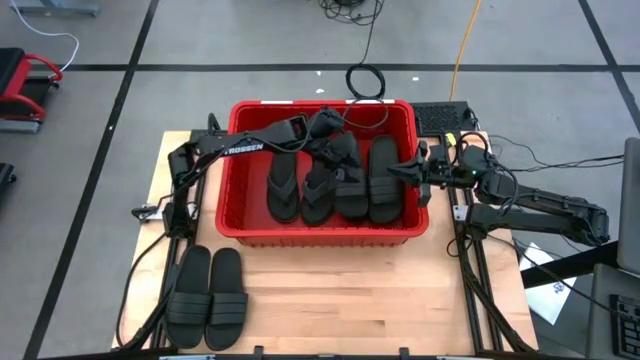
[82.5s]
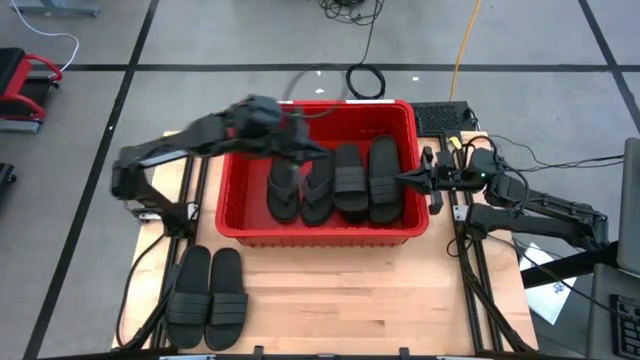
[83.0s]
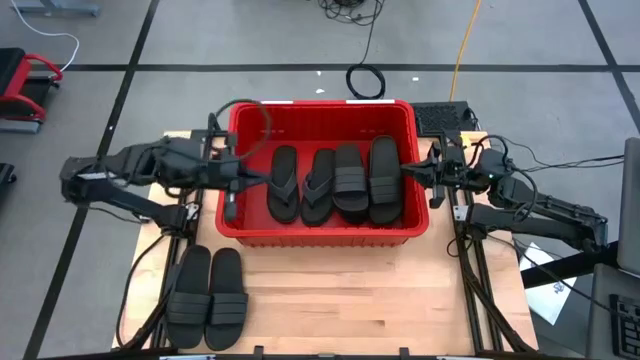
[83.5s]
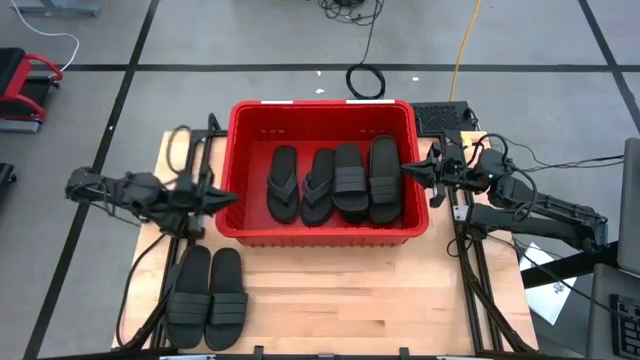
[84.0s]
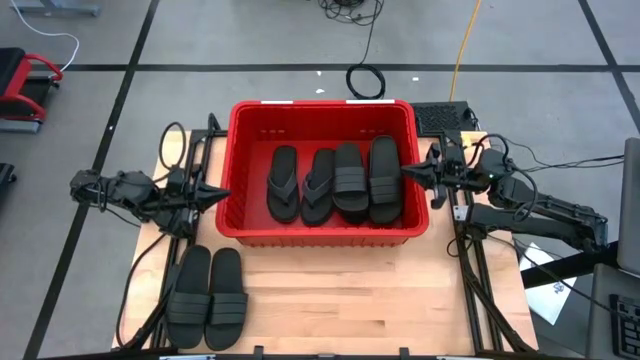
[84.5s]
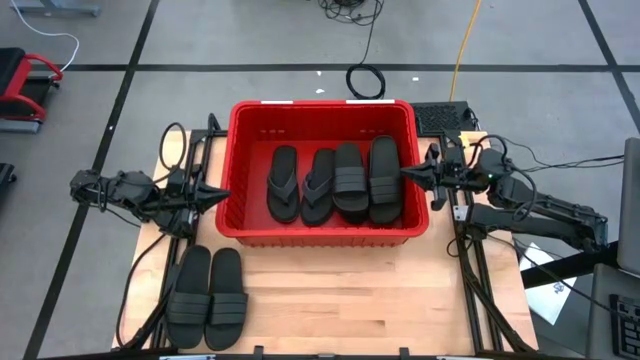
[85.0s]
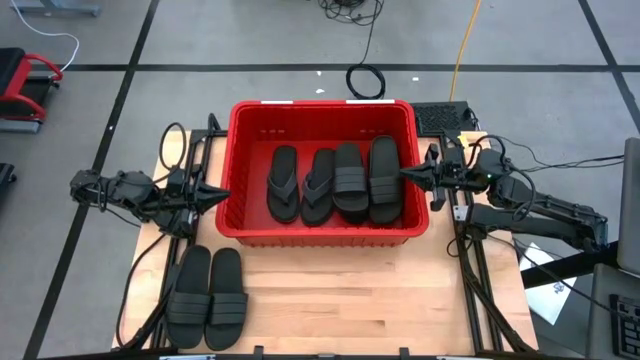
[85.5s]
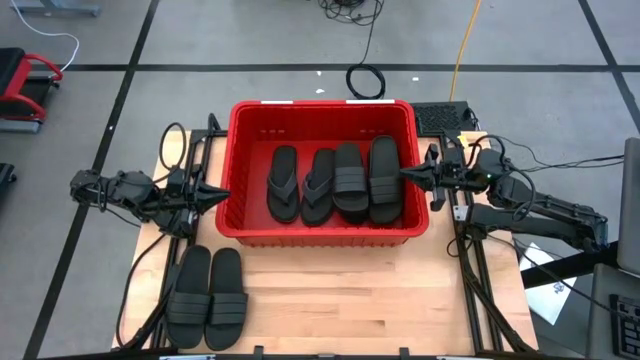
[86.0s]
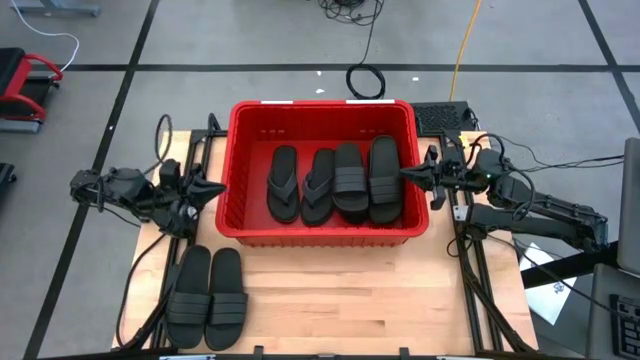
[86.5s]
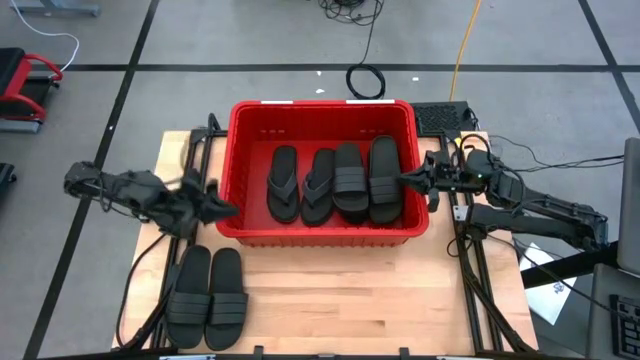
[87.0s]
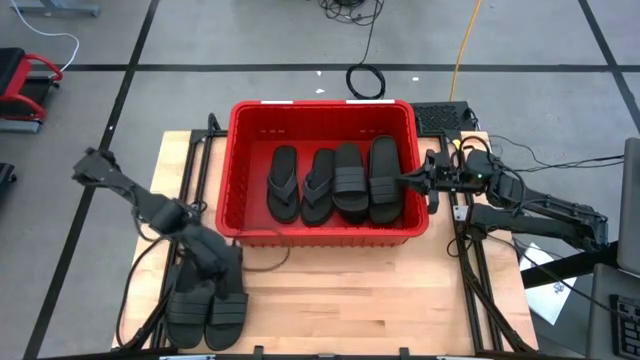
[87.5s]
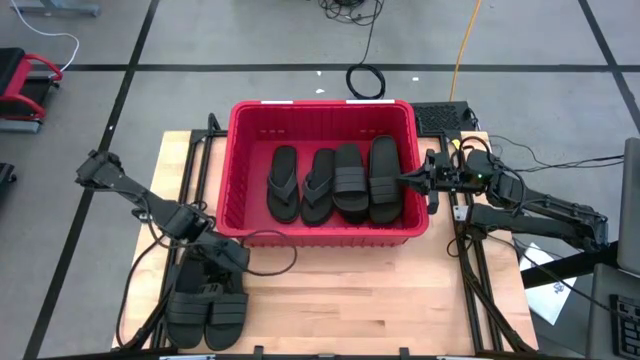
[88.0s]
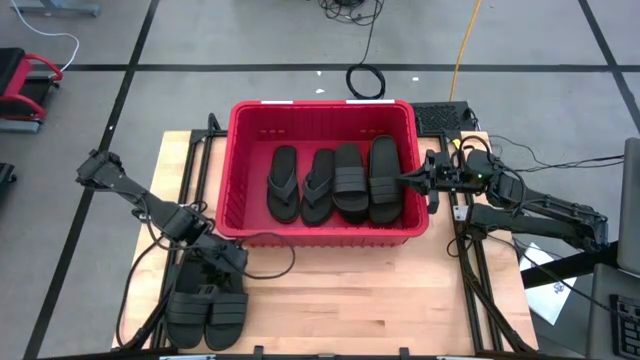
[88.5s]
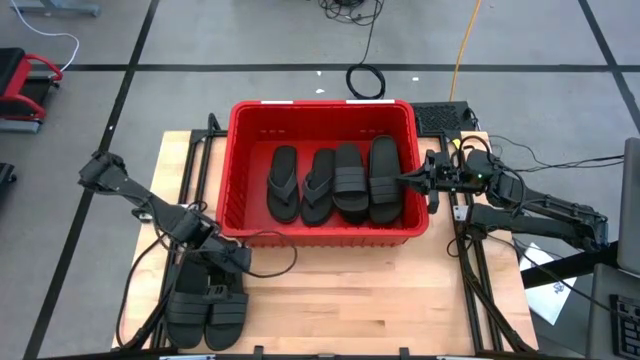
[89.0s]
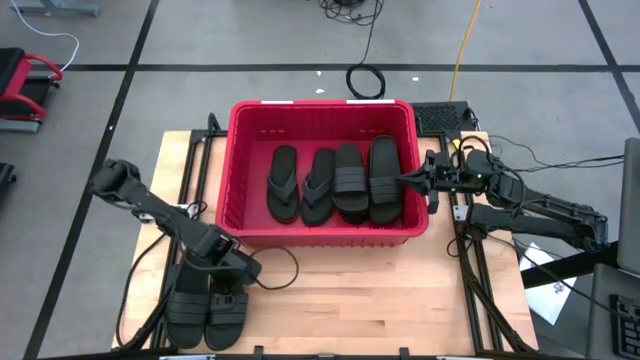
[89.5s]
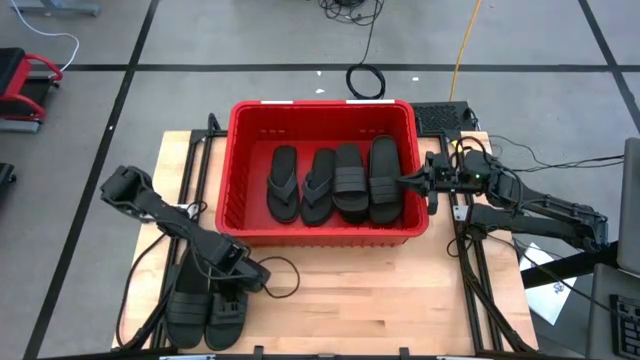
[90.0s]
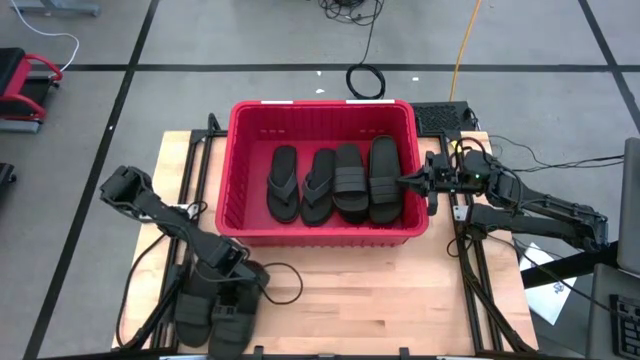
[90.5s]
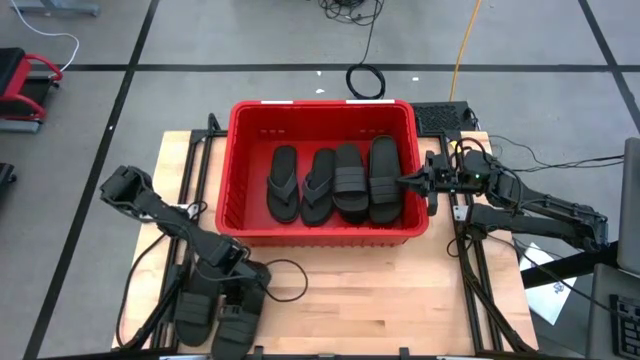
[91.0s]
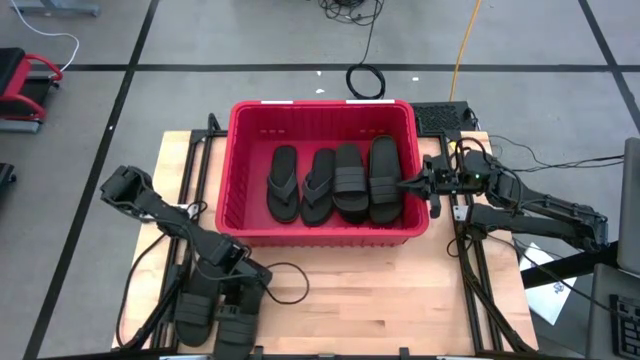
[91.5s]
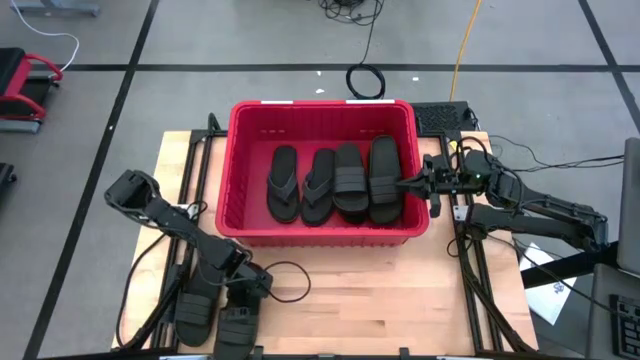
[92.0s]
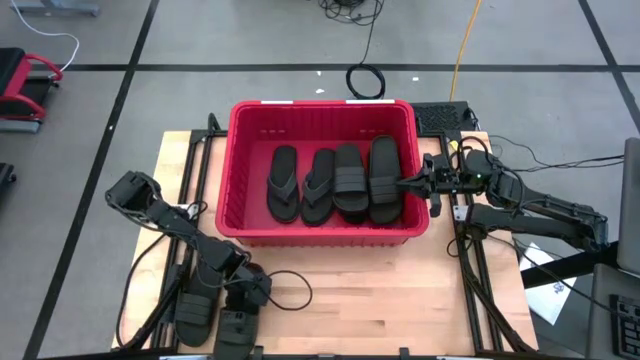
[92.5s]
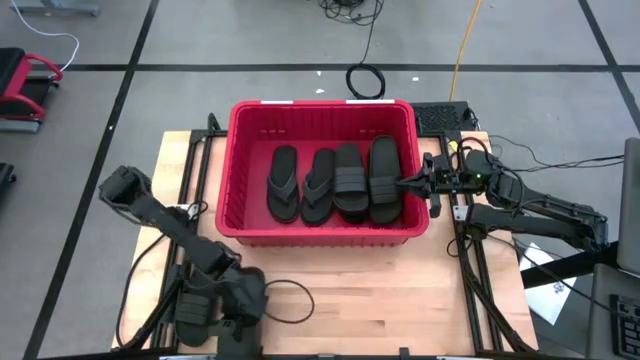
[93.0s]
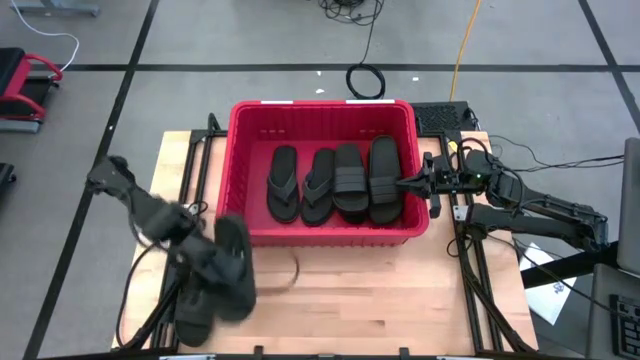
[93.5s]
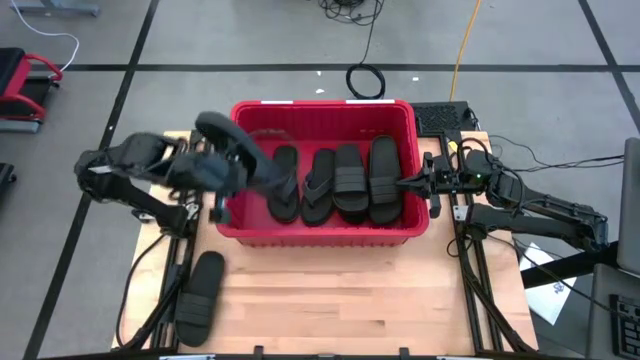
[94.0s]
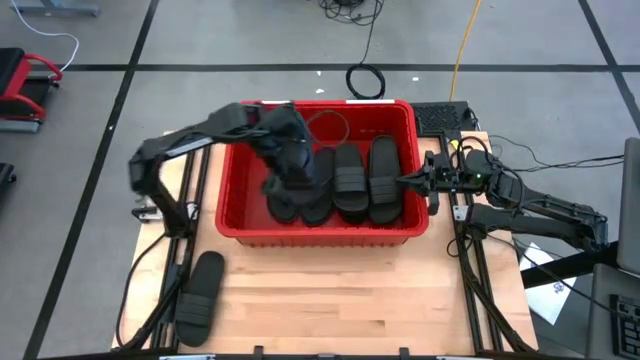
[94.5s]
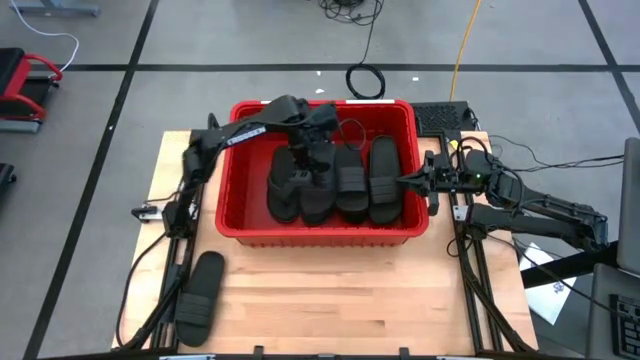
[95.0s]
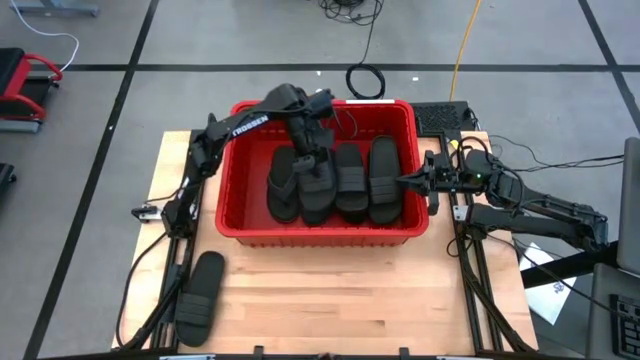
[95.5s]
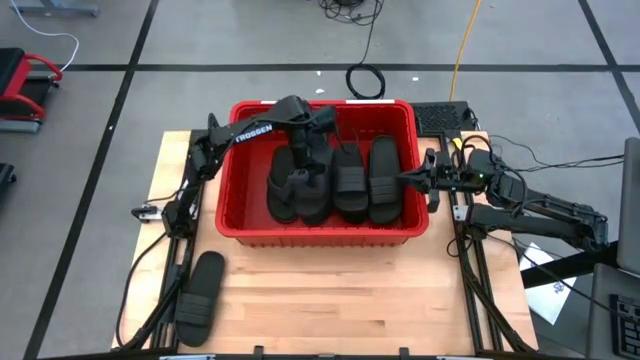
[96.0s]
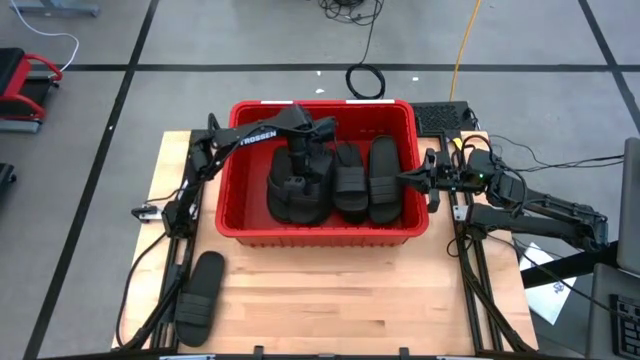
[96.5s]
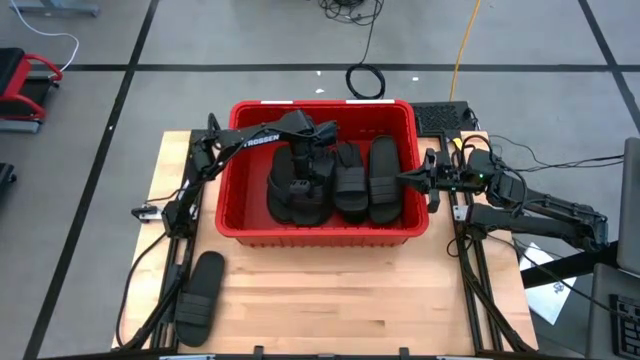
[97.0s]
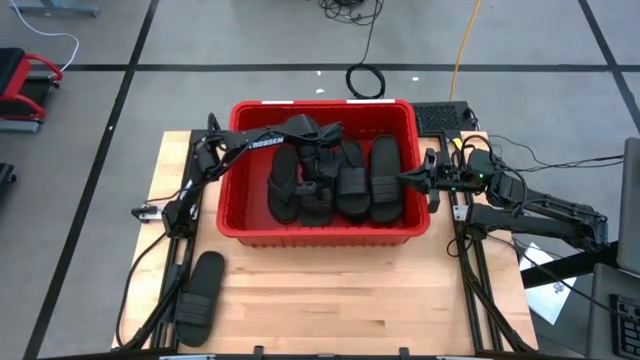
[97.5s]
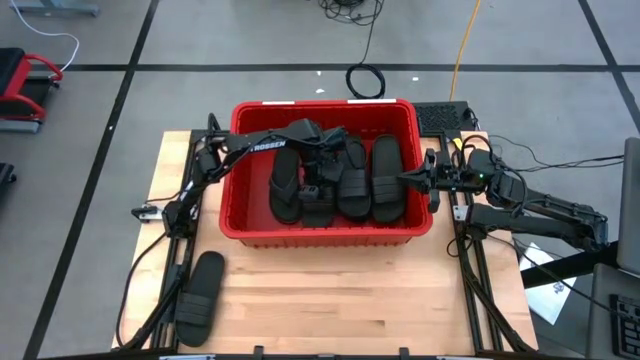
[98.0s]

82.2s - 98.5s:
Task: Pick and place slides into bin
Put the right slide into the bin

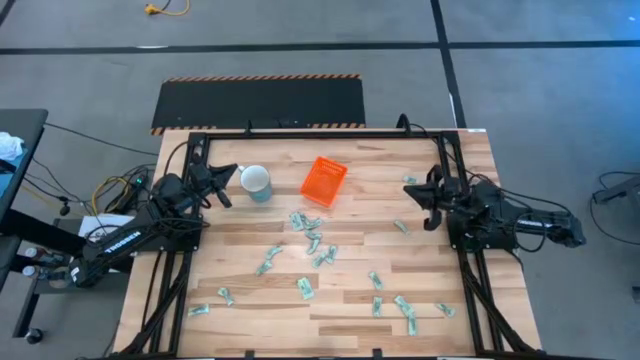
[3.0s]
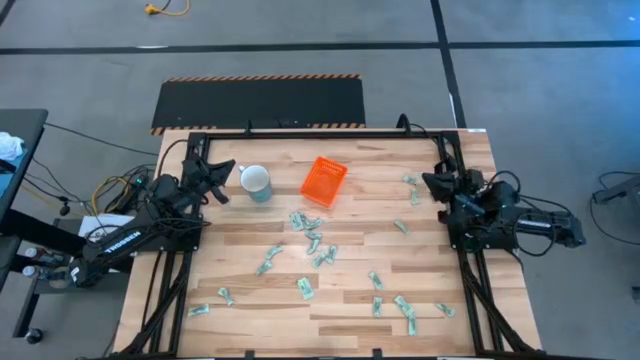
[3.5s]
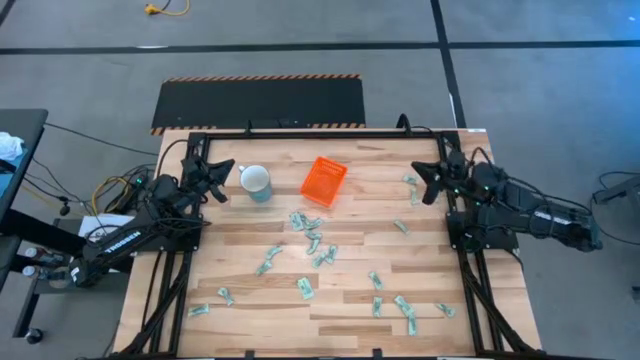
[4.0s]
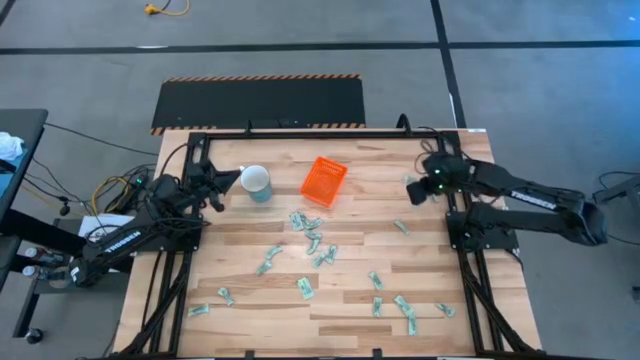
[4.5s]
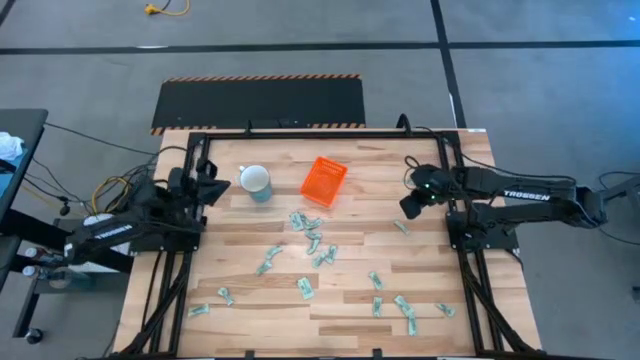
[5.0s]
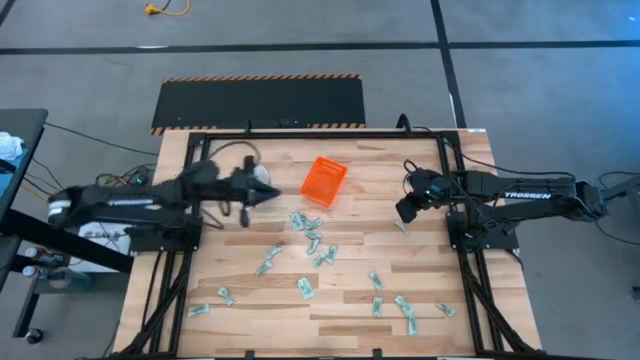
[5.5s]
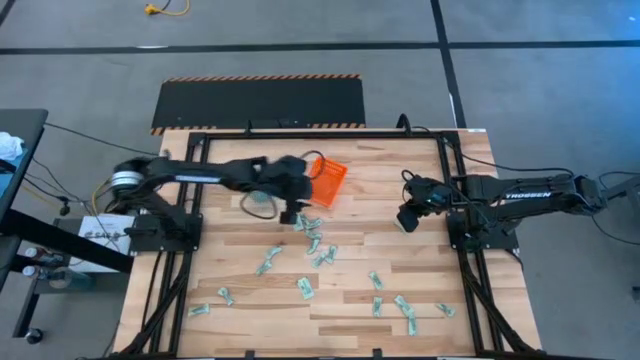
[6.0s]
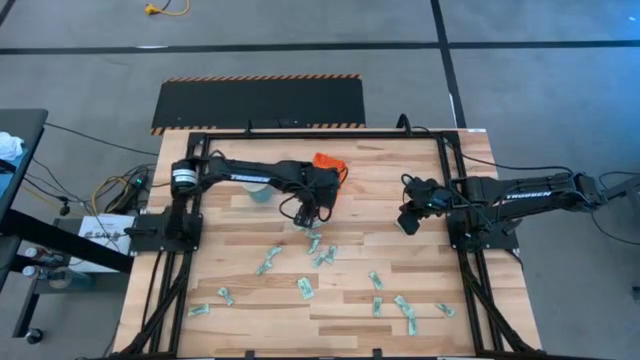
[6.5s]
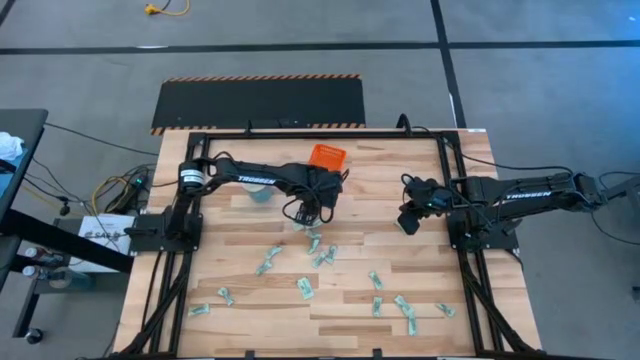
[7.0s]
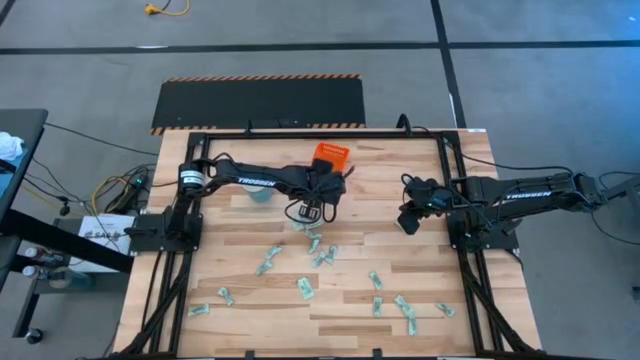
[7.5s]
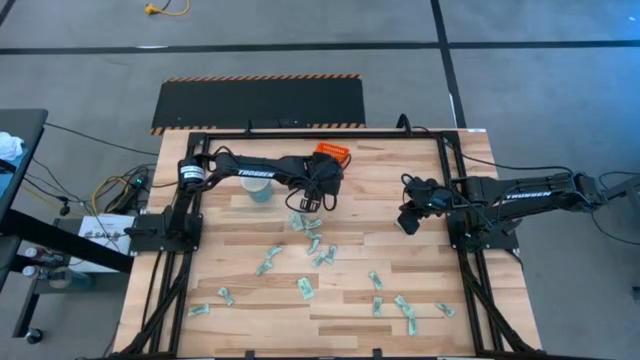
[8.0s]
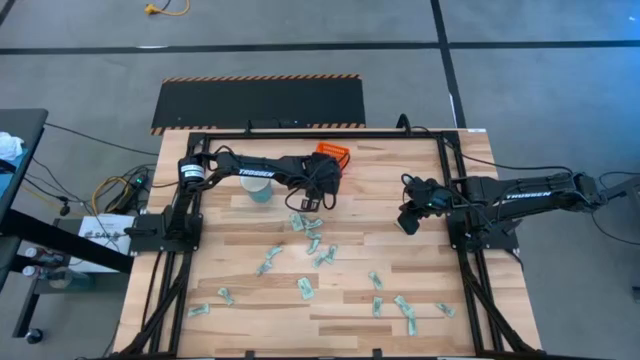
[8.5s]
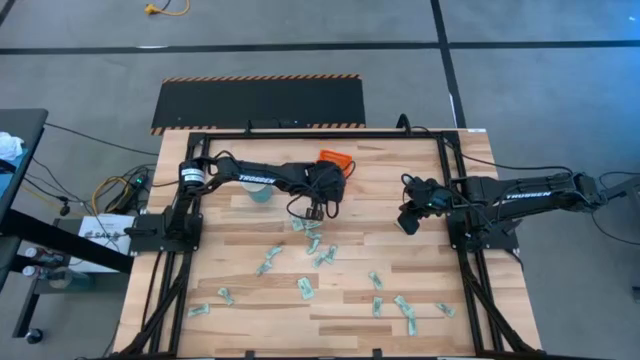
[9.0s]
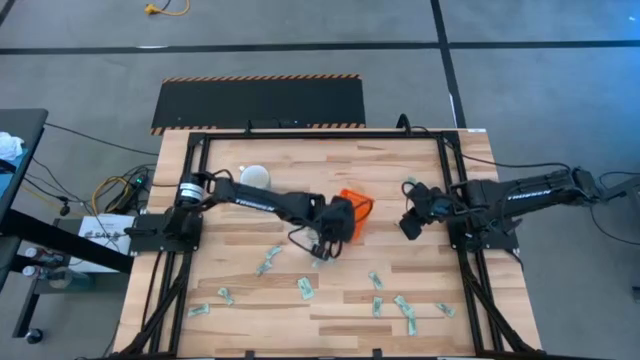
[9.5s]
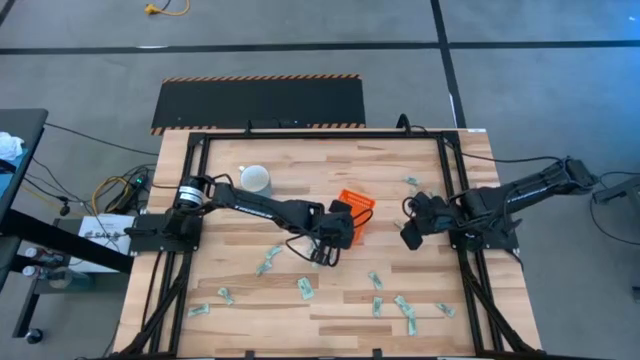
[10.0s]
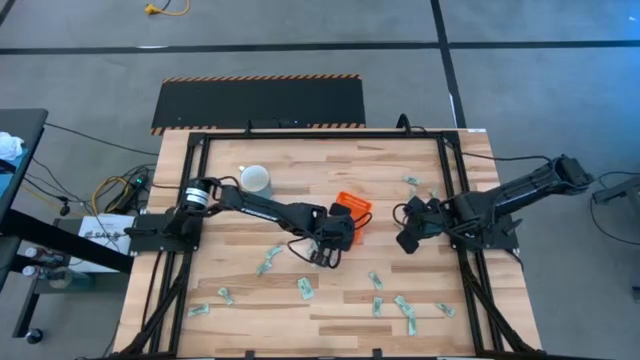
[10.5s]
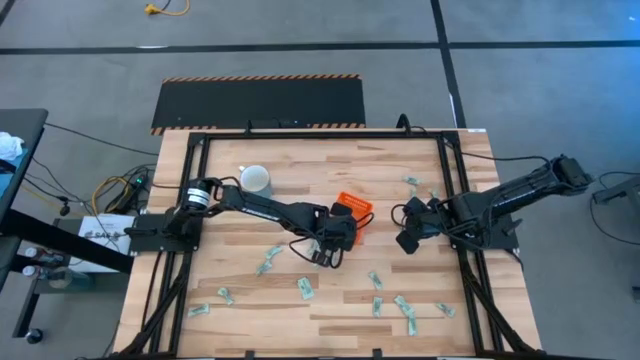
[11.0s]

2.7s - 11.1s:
Task: Pick and place Stevia / Truvia into bins
Move the basket to the center of the table
